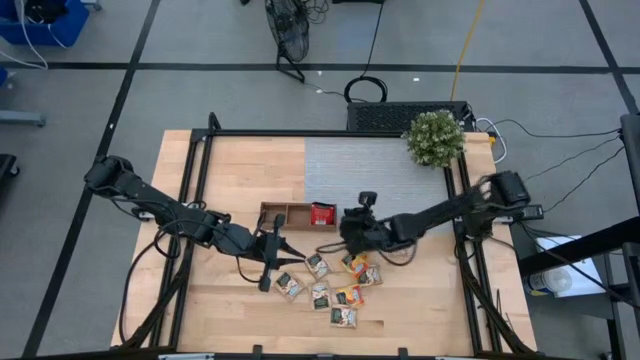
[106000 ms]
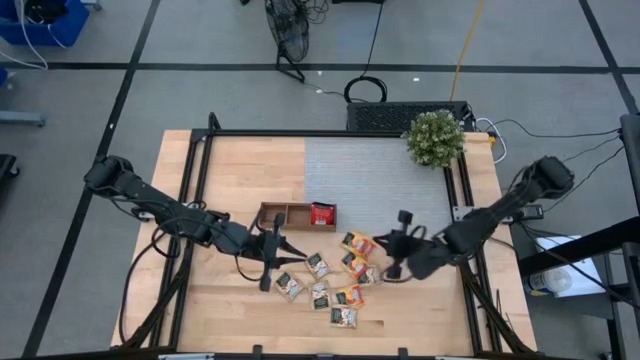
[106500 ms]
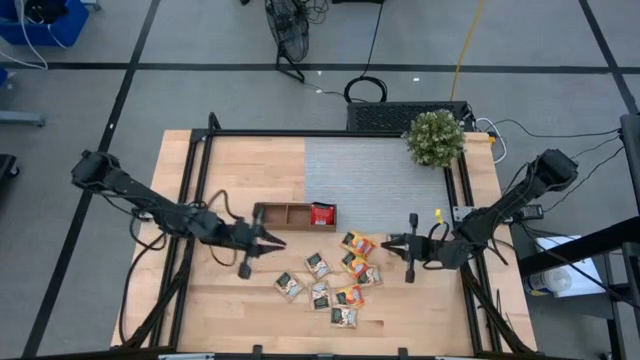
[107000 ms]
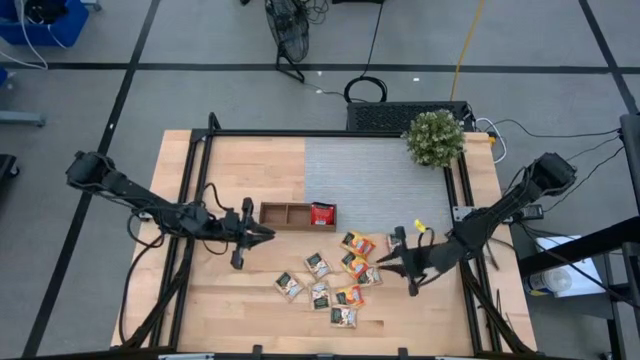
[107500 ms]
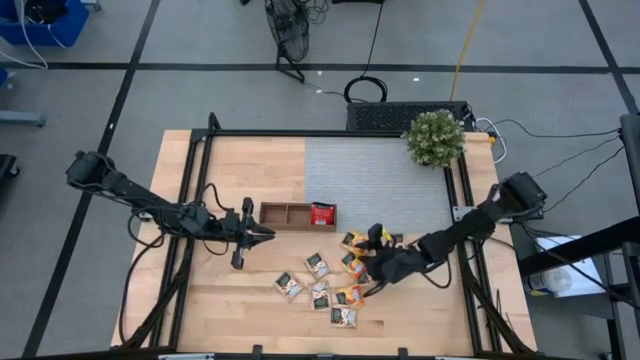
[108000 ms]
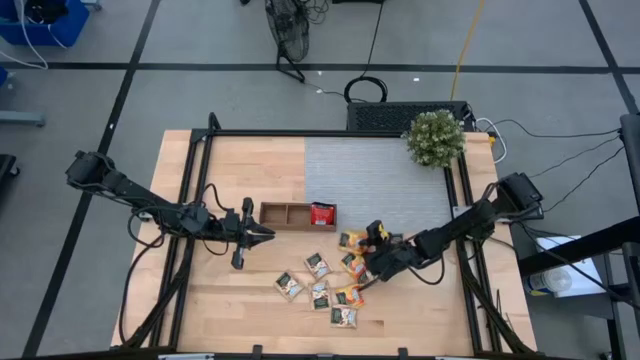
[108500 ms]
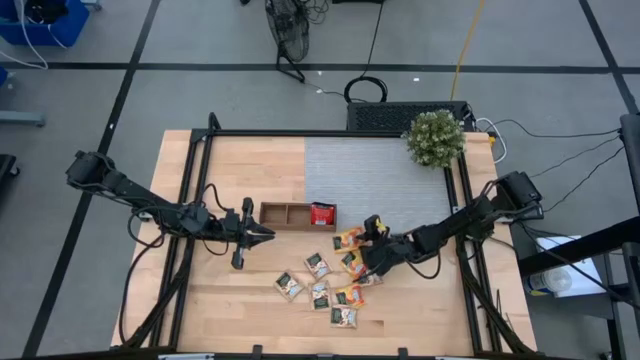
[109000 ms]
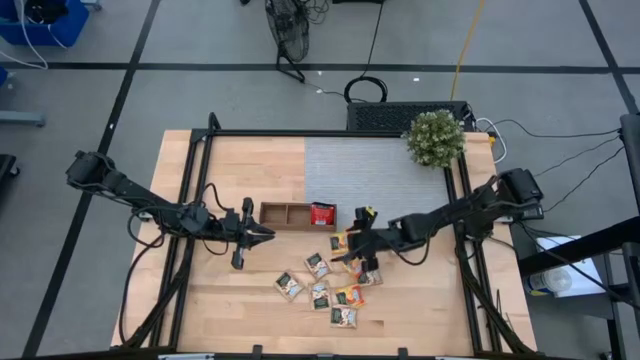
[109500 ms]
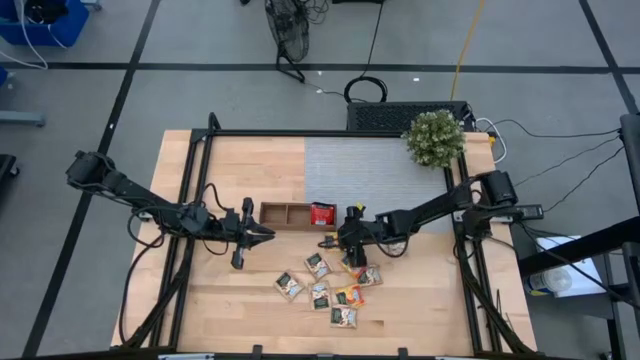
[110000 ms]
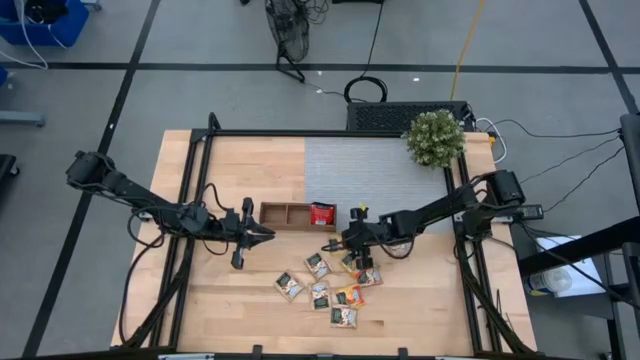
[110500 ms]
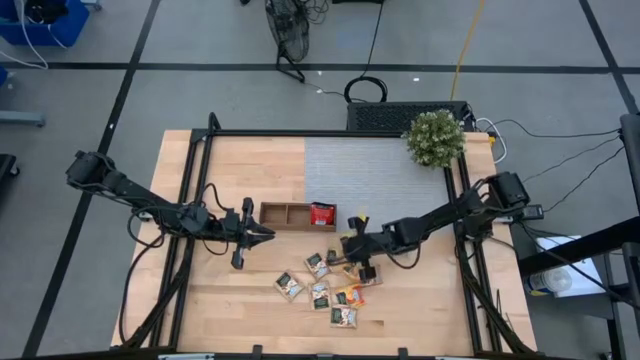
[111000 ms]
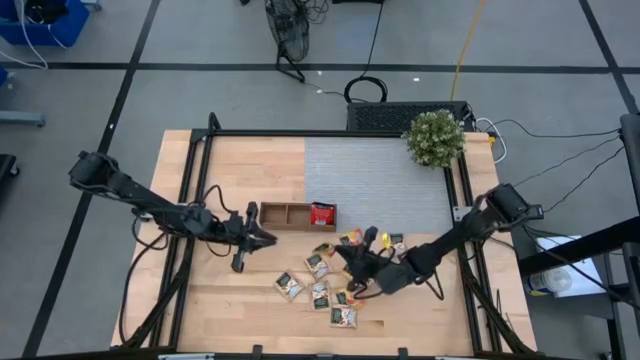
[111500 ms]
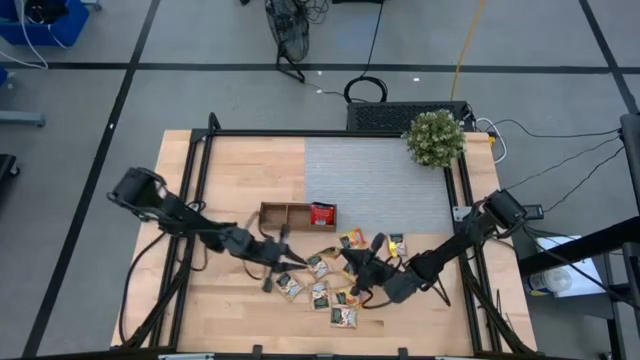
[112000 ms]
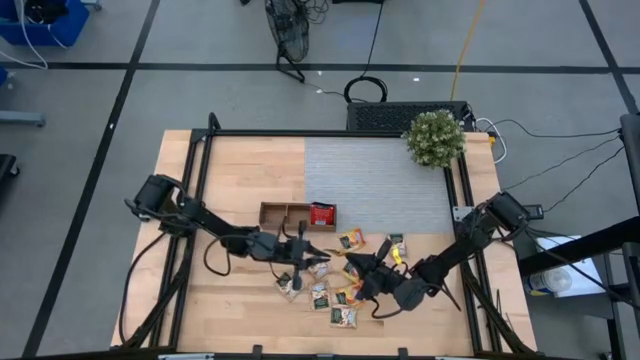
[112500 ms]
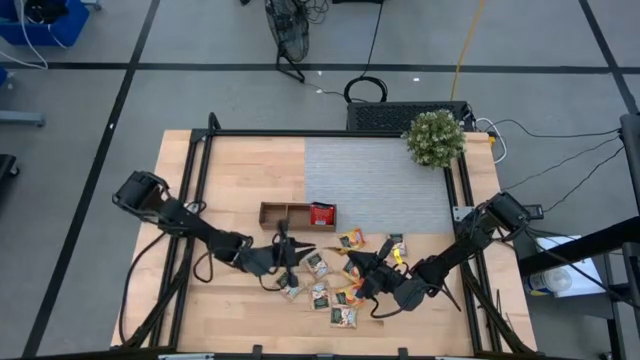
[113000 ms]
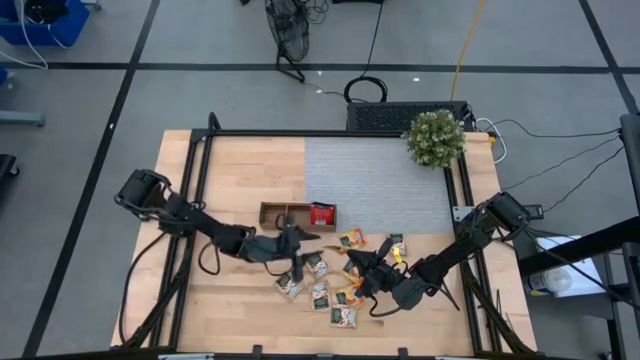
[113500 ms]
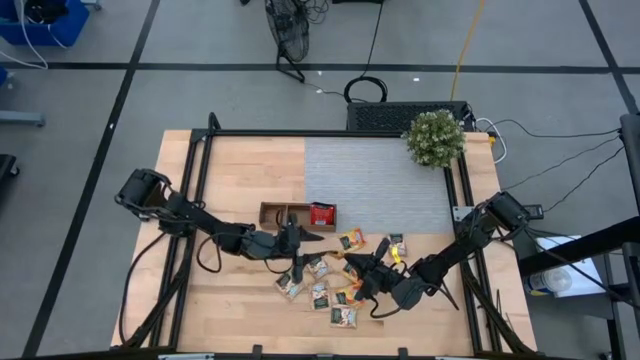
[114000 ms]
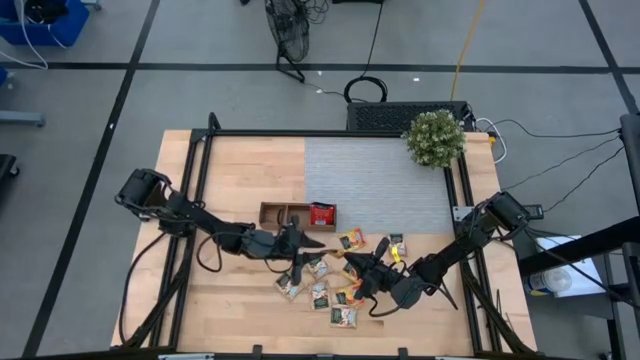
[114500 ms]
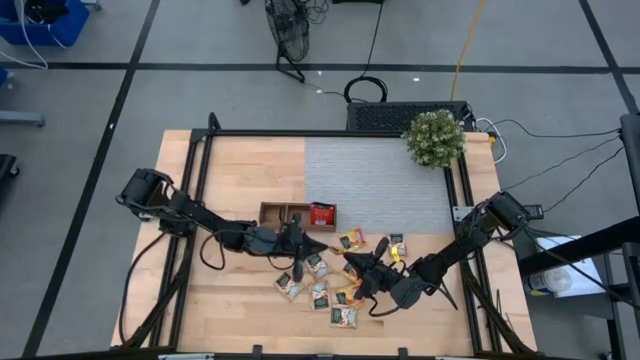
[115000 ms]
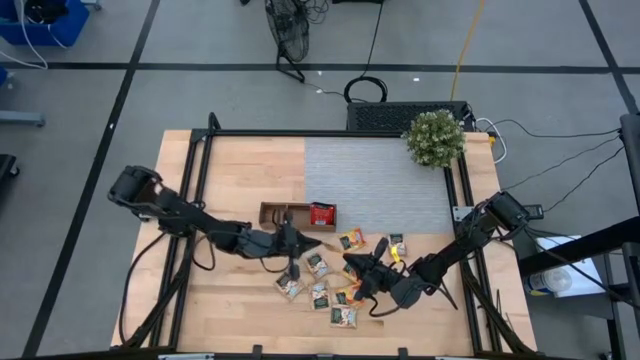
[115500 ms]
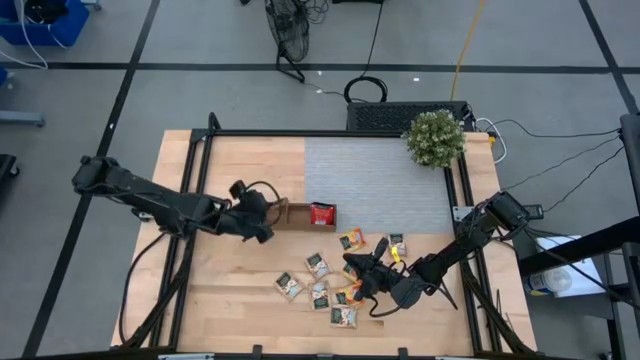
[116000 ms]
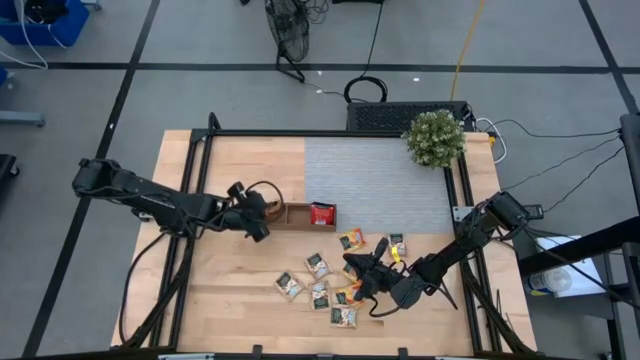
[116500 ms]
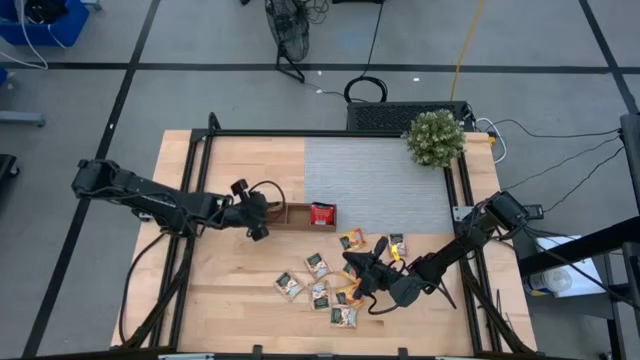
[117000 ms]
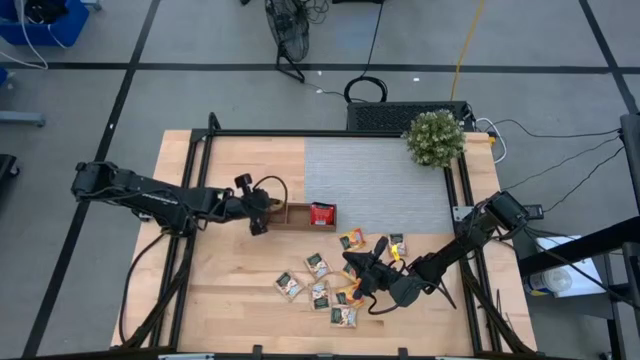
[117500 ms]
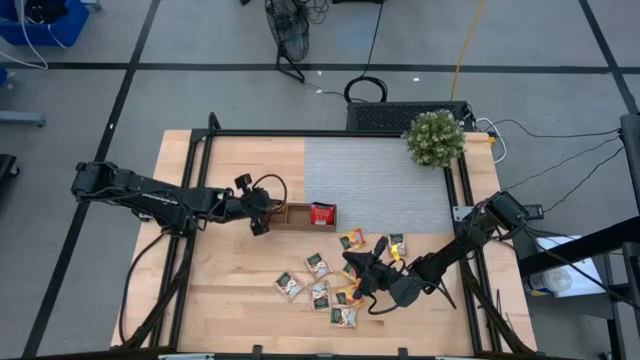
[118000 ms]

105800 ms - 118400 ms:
Task: Pick & Place Tea
Put the yellow tea bag into the left section of the wooden organizer

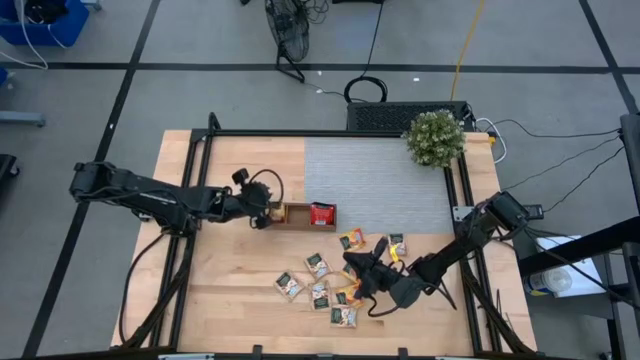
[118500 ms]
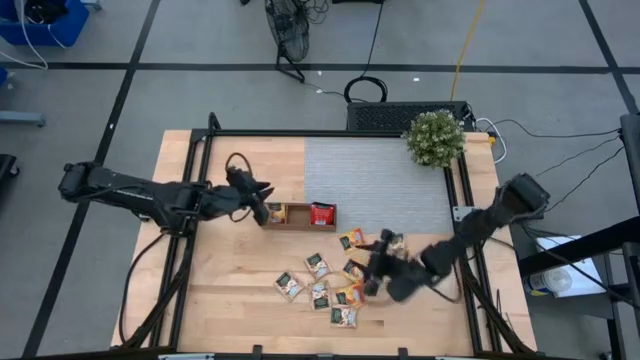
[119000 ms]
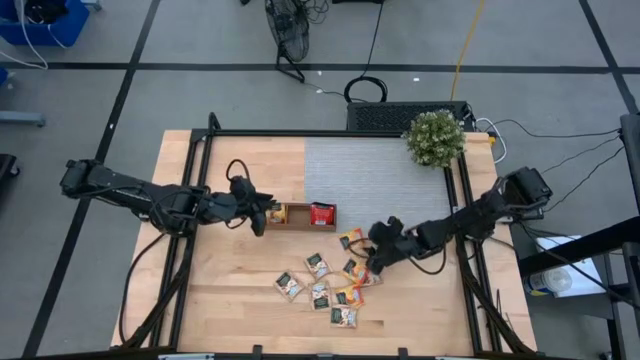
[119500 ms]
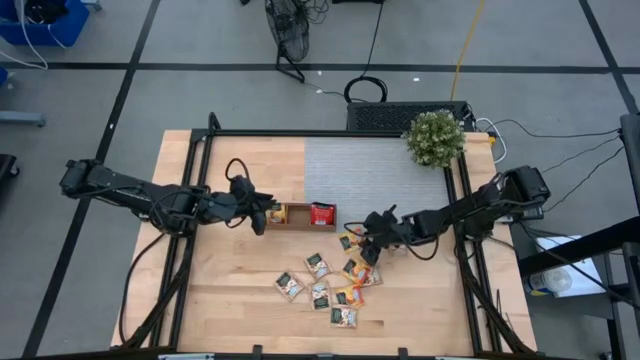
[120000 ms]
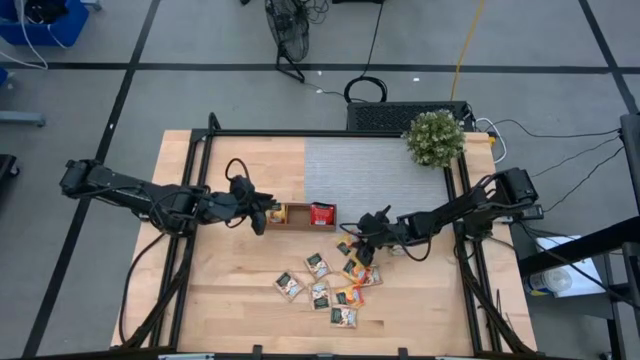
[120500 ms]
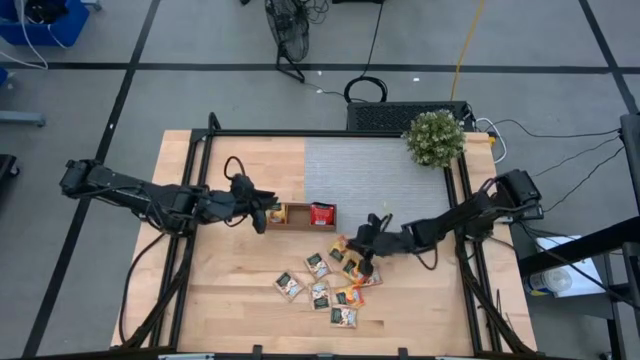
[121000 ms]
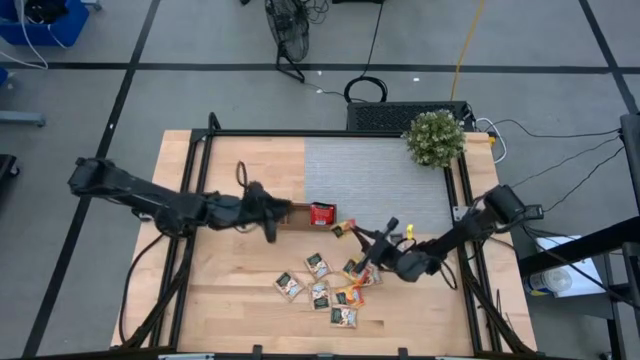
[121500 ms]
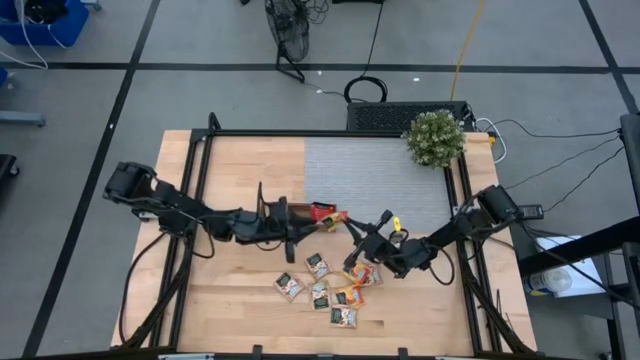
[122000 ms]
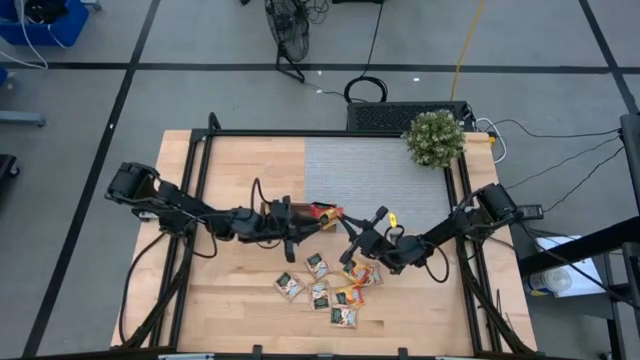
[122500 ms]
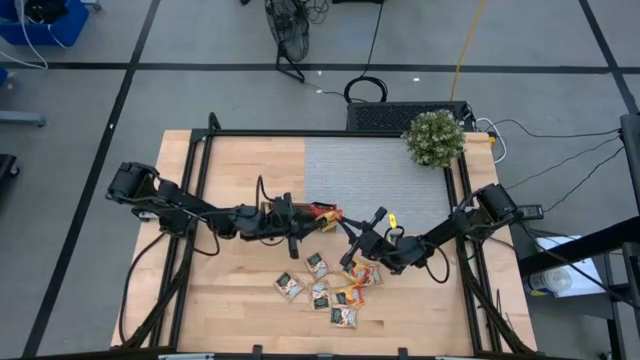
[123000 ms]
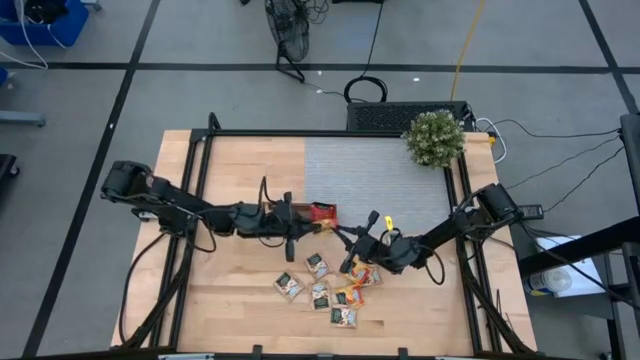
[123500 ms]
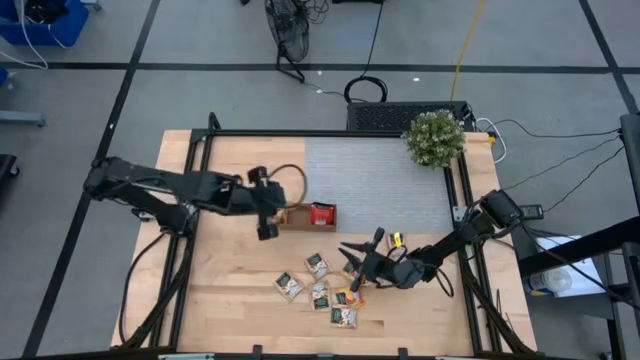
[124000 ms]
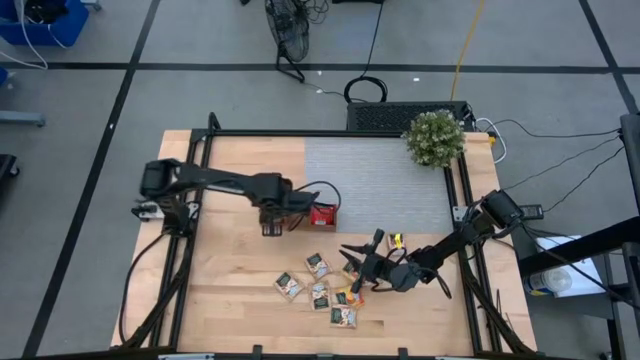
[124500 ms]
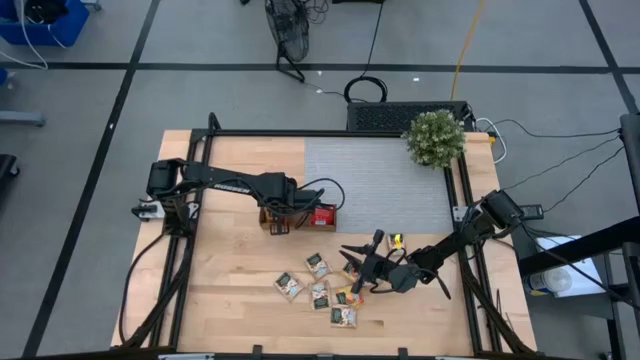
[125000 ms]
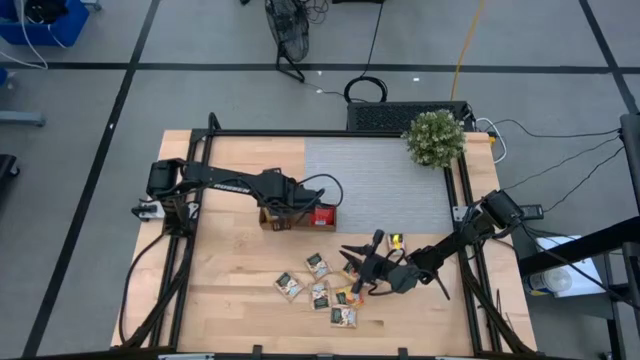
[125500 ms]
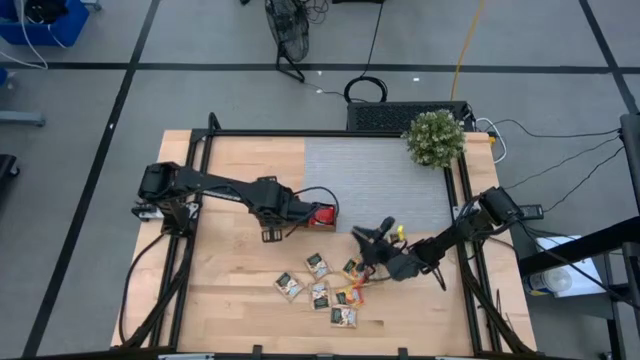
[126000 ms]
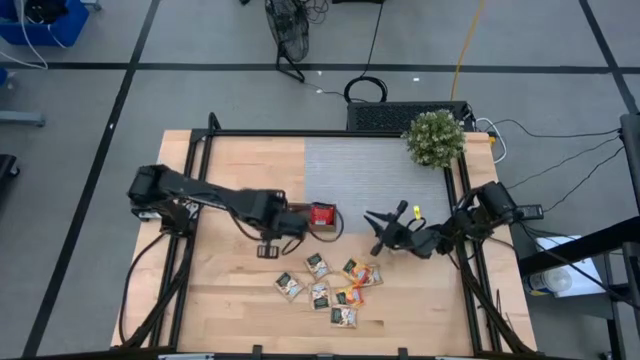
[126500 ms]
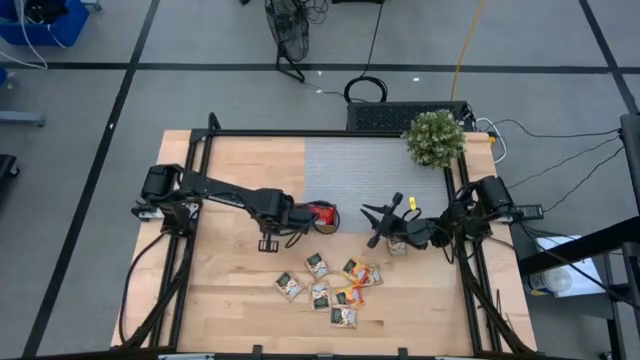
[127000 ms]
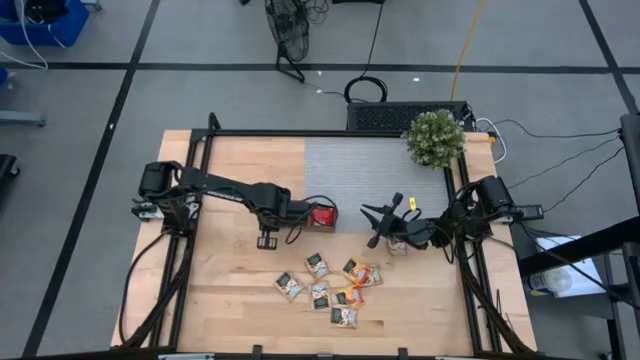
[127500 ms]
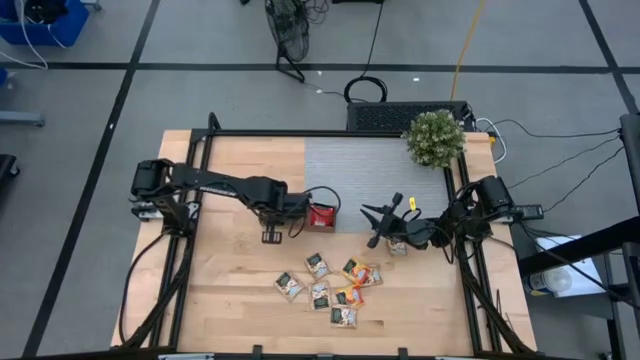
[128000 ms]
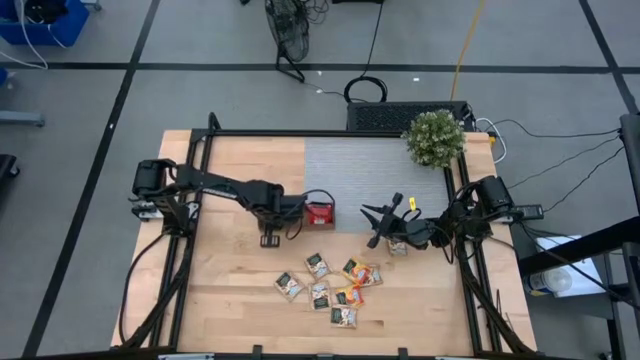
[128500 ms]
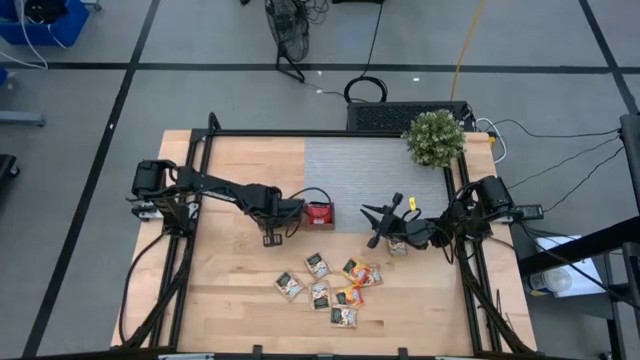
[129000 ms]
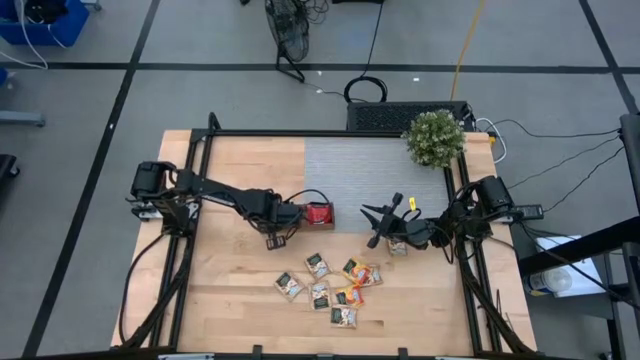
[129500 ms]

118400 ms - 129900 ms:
Put the yellow tea bag into the left section of the wooden organizer
